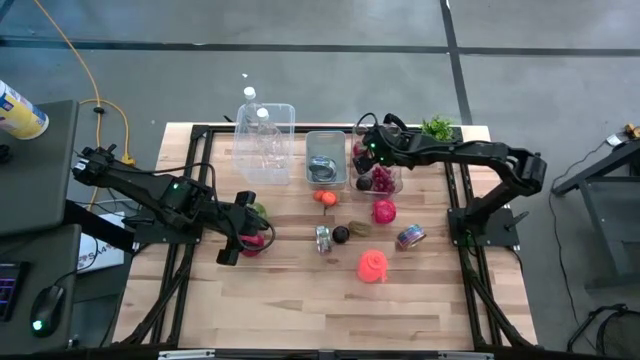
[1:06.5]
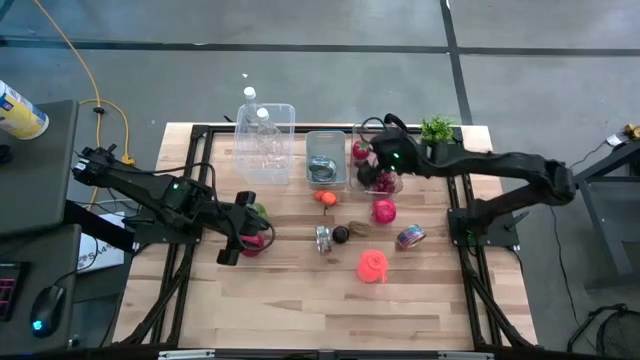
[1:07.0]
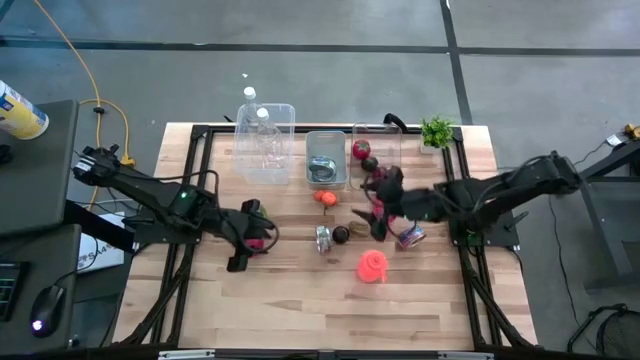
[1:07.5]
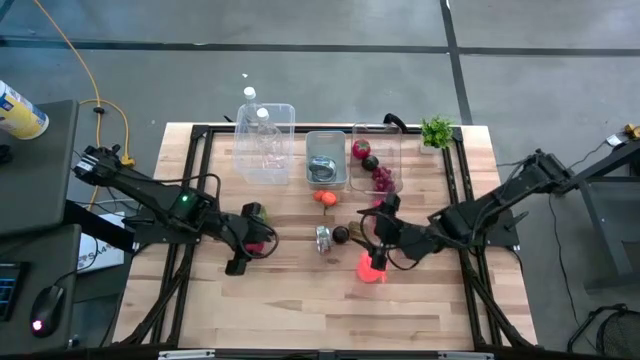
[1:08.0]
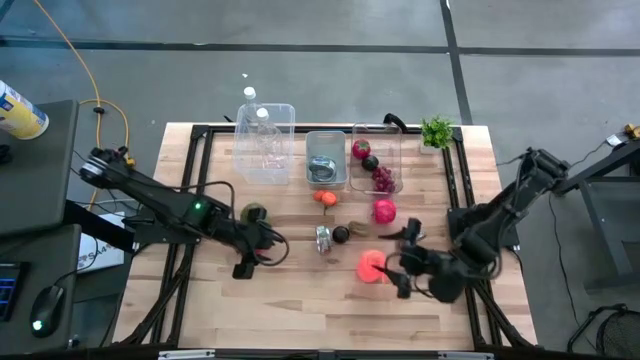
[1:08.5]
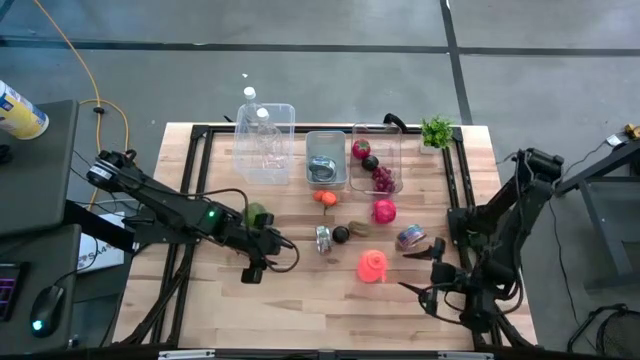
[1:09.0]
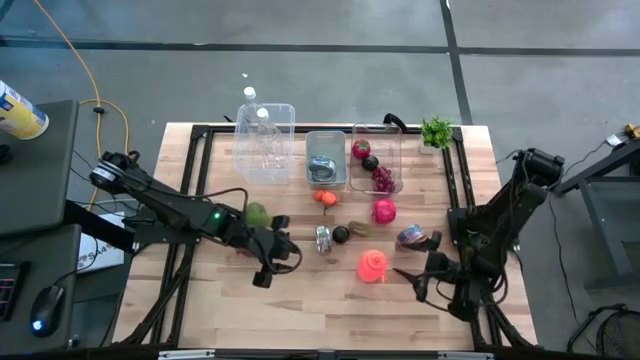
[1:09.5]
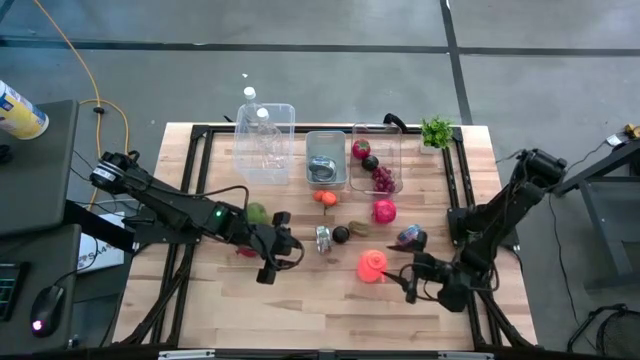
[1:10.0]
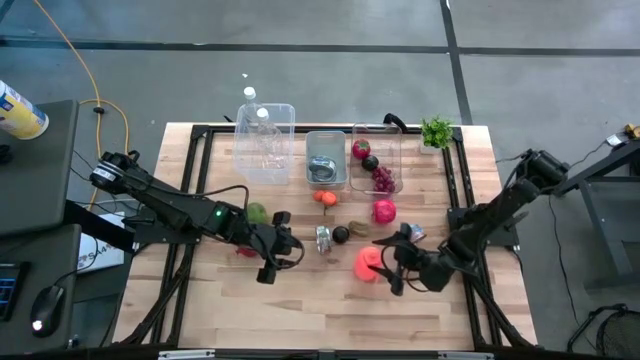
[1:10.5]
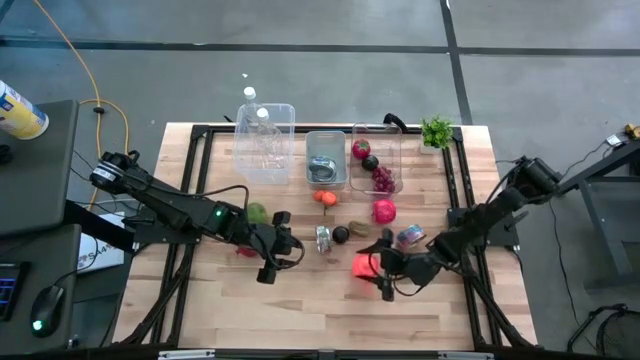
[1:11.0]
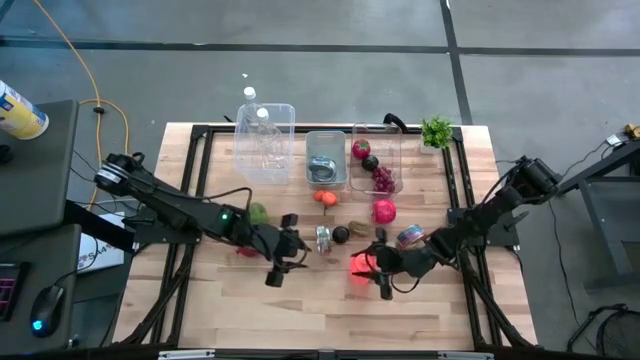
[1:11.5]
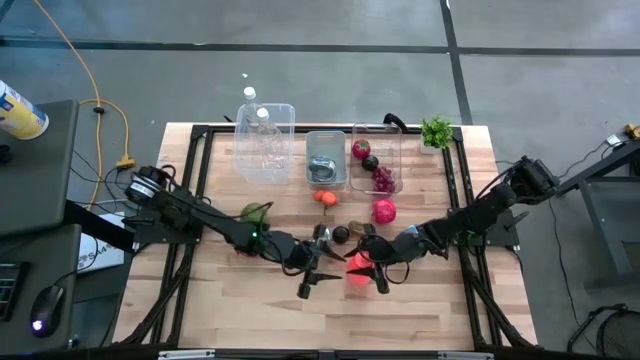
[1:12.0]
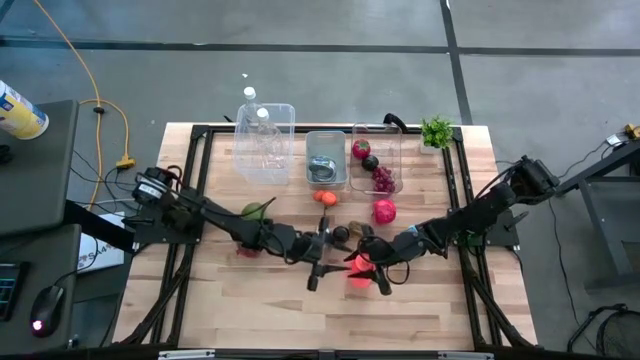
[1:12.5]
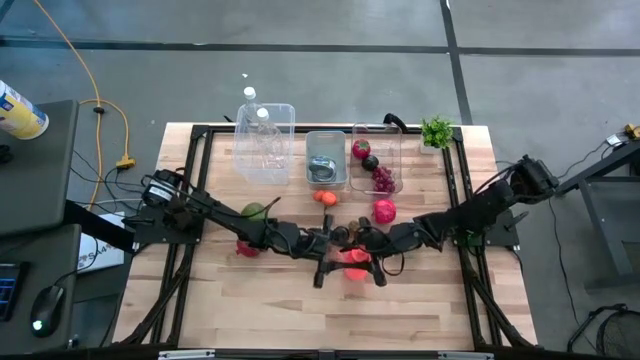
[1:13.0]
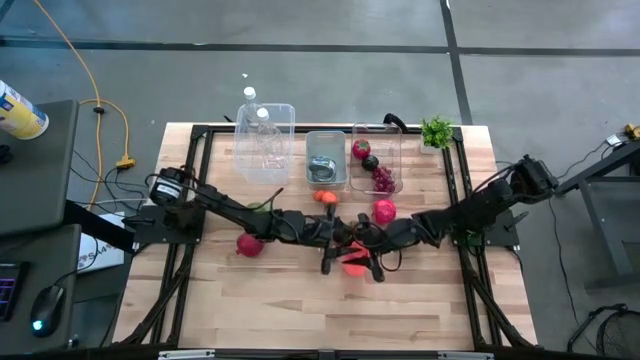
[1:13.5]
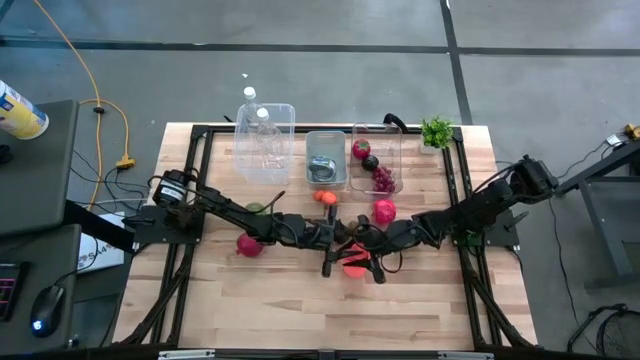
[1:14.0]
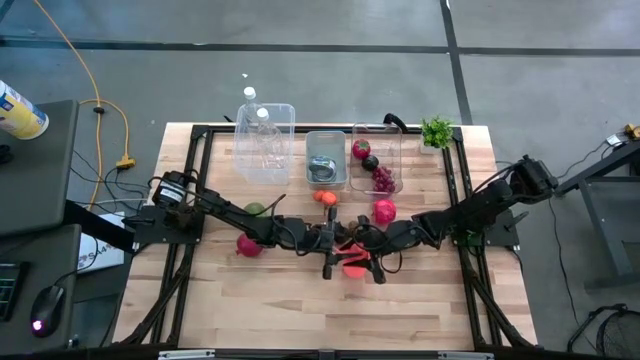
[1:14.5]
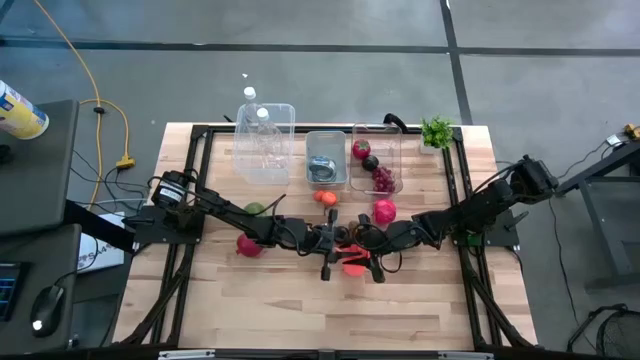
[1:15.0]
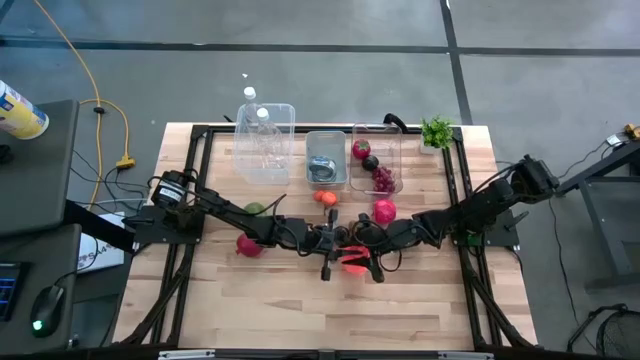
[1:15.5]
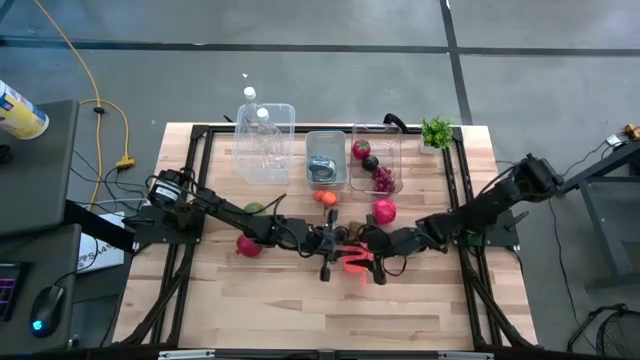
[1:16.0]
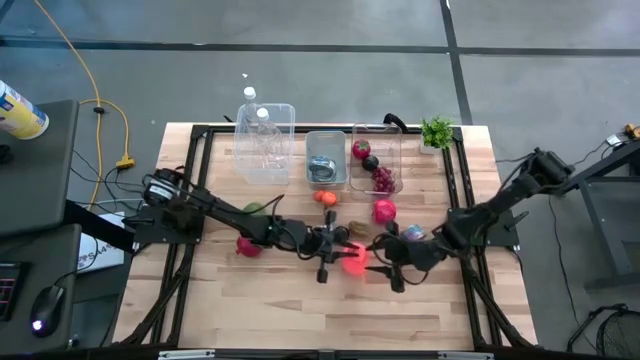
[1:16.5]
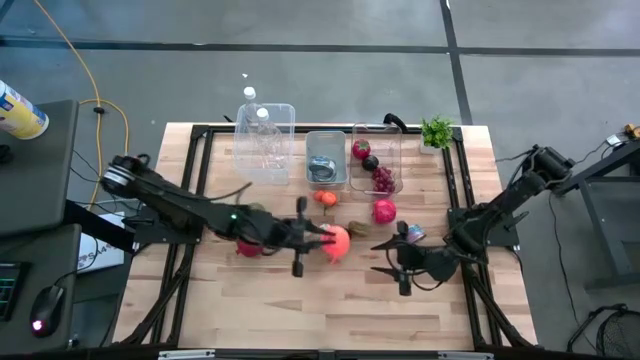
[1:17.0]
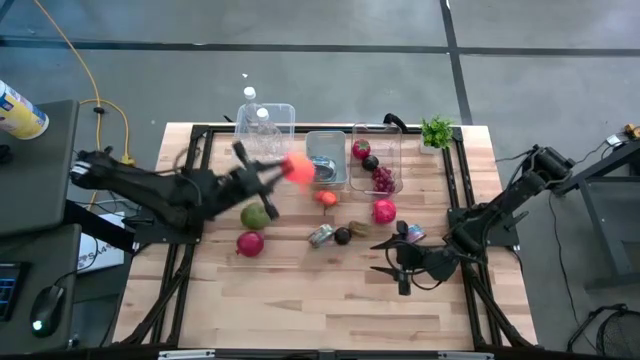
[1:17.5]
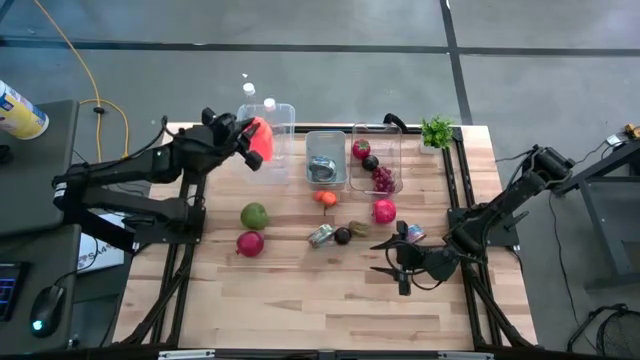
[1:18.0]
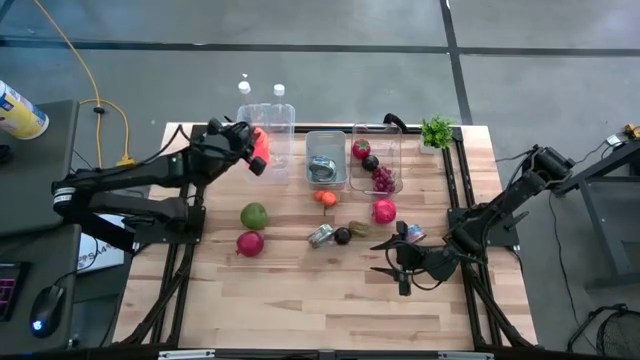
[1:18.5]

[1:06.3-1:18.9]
Task: Pick & Place Food Item
Put the orange bottle into the white bin

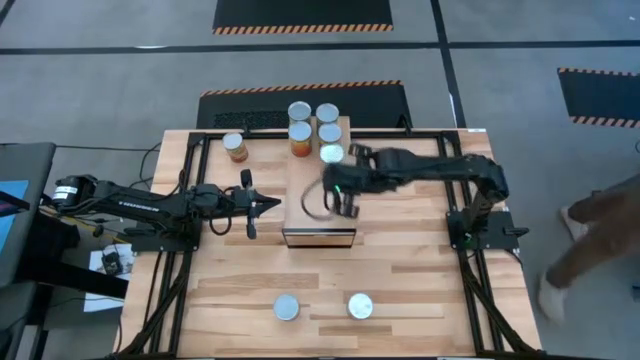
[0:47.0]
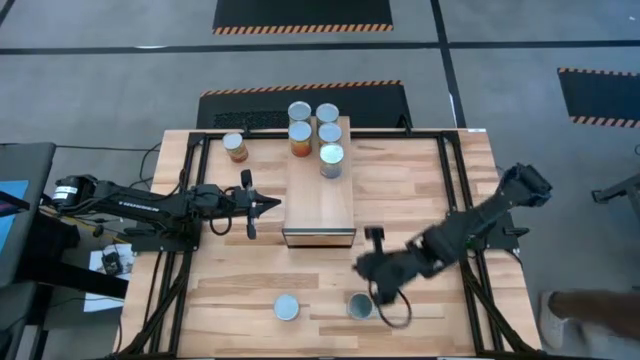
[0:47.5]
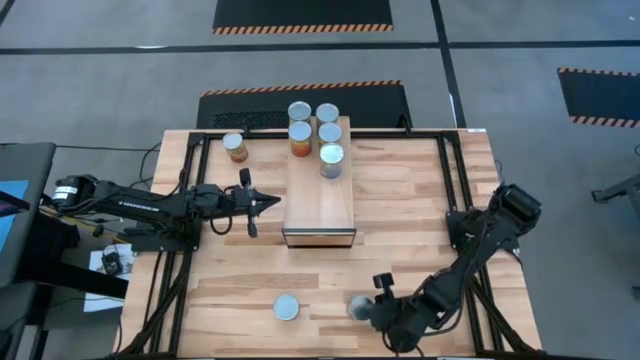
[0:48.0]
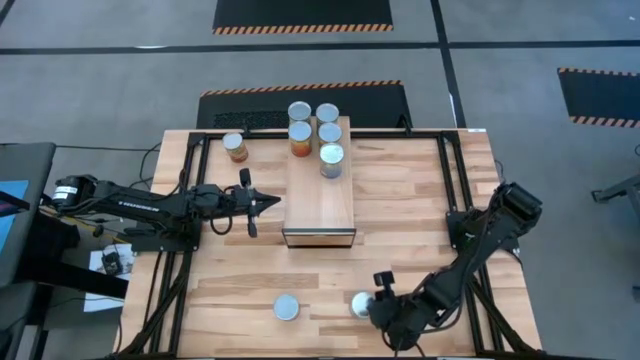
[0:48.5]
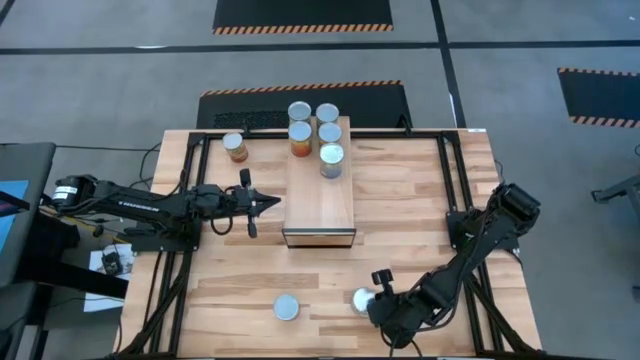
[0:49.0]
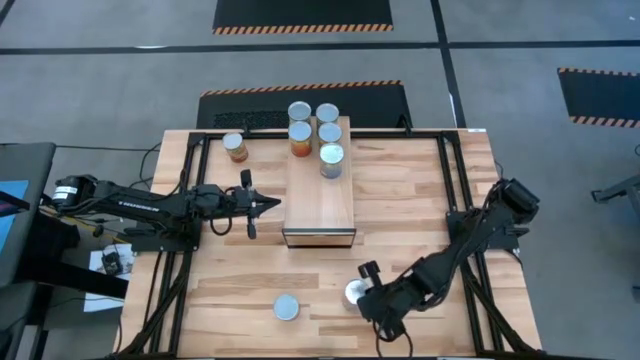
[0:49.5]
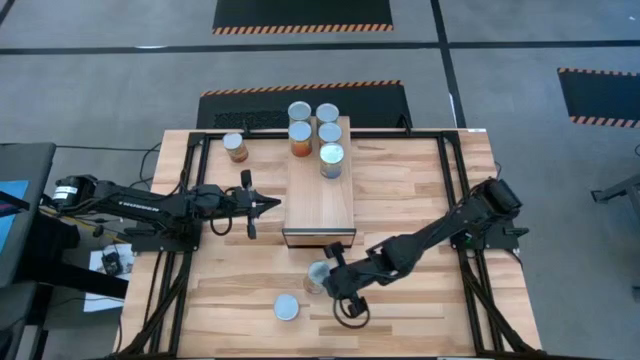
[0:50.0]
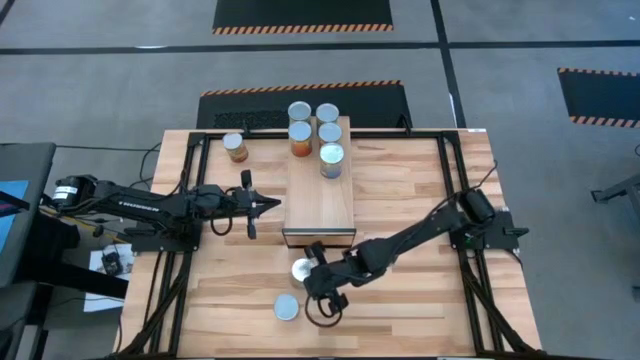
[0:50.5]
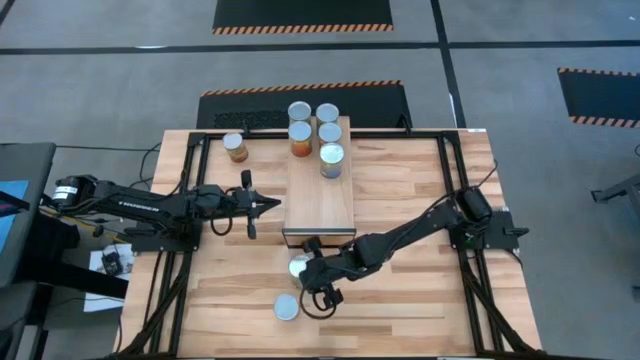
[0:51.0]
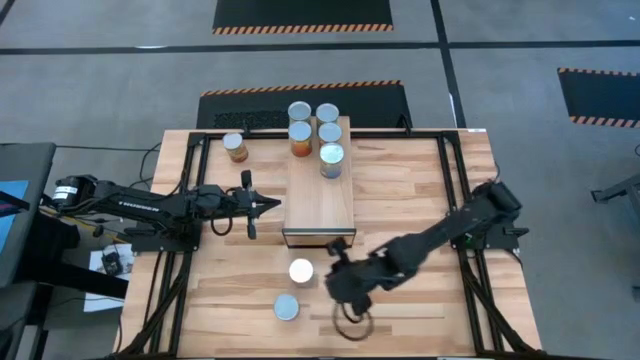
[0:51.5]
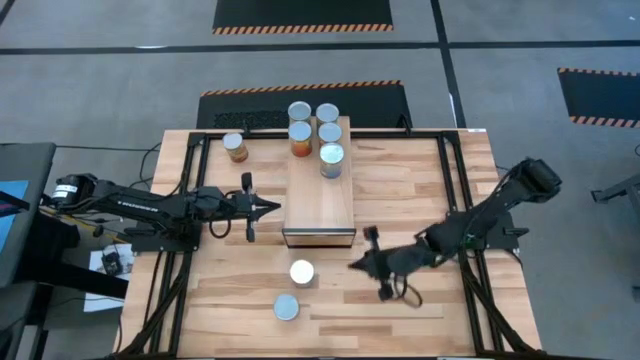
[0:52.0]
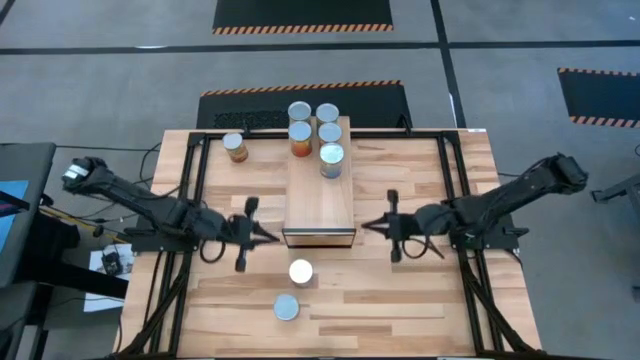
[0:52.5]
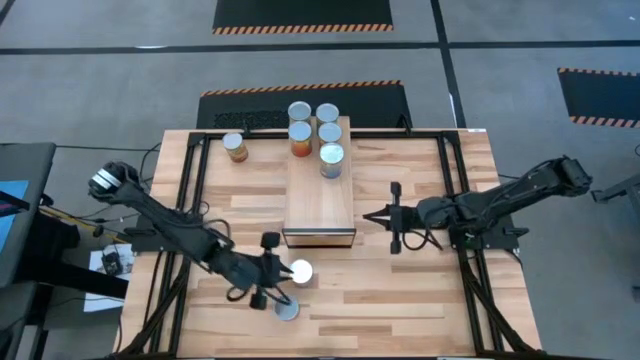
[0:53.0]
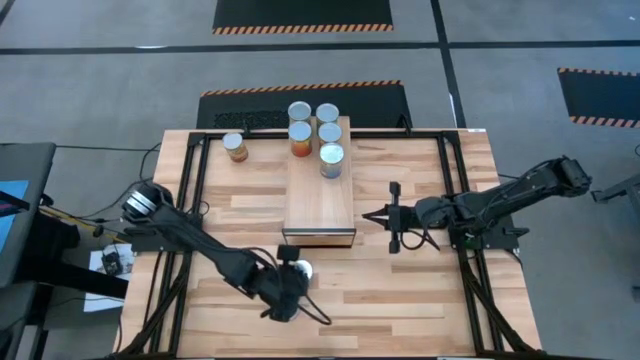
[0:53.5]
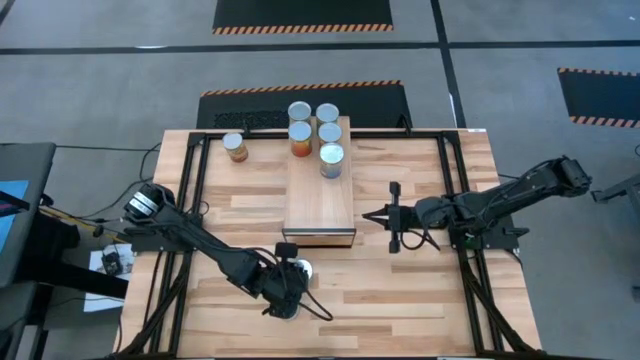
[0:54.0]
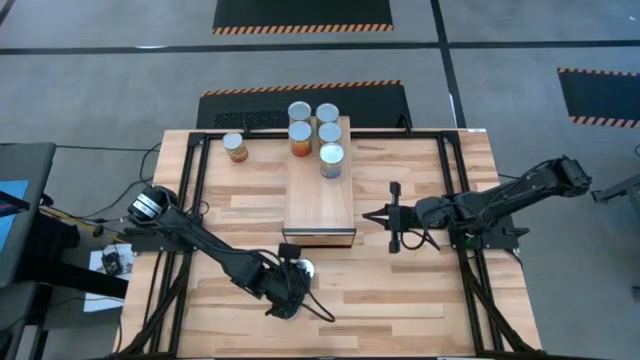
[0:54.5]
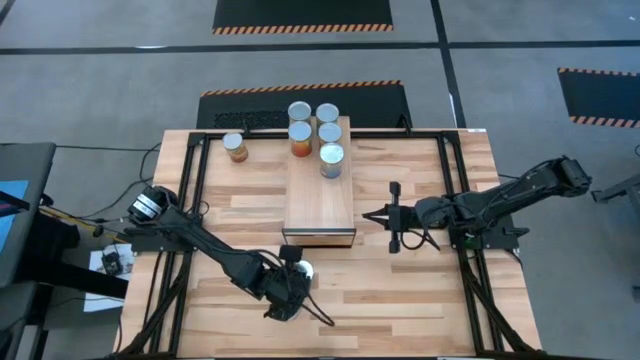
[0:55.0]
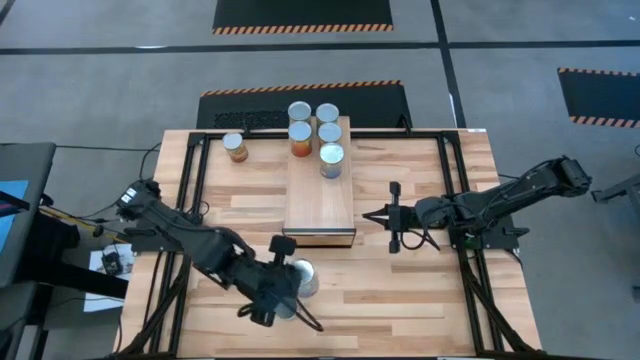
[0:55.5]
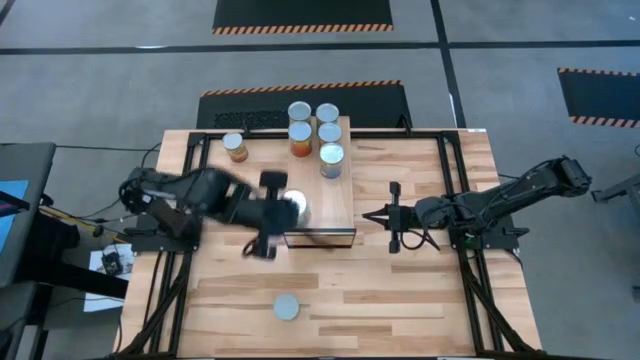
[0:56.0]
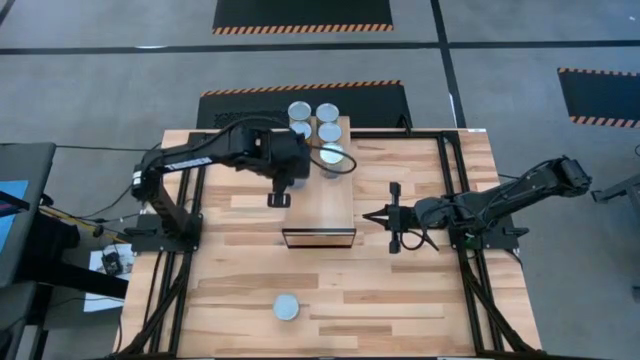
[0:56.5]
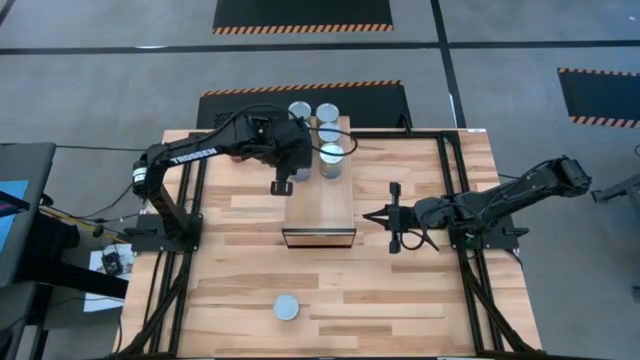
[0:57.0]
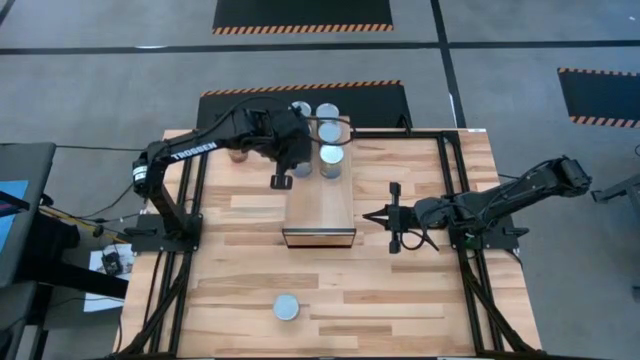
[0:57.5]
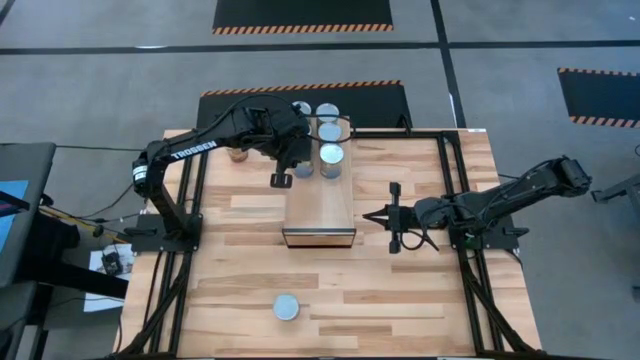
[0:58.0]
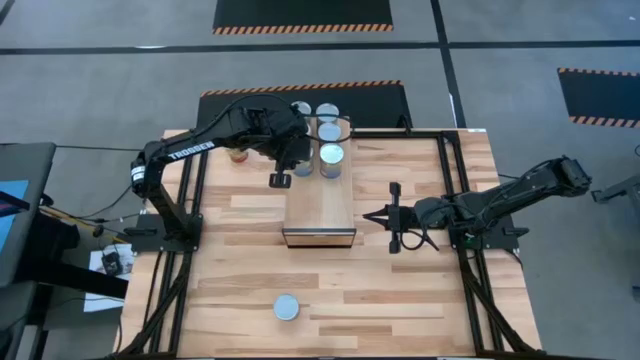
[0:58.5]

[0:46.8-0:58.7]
Task: Pick and place cans onto a shelf
Put the canned peaches on the shelf aligned with other canned peaches
